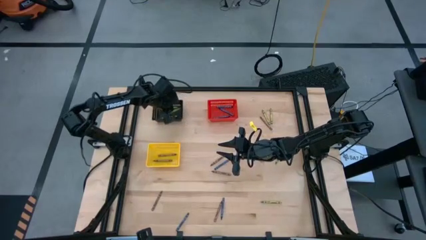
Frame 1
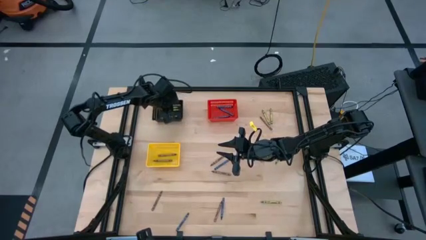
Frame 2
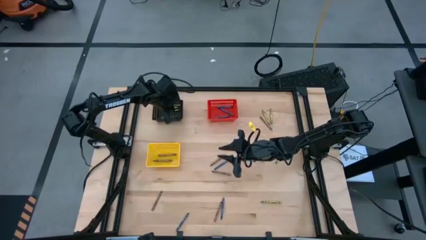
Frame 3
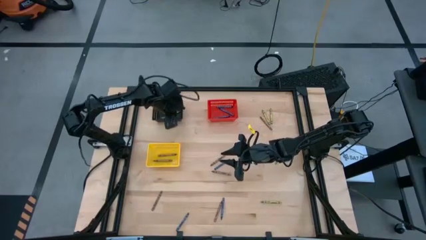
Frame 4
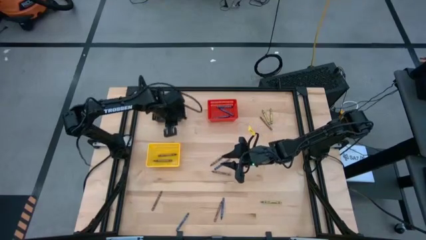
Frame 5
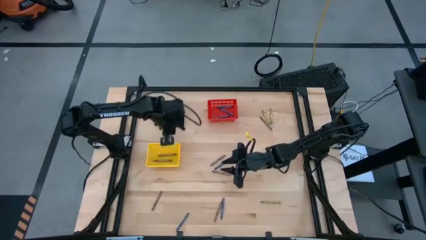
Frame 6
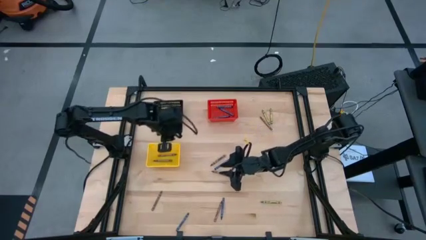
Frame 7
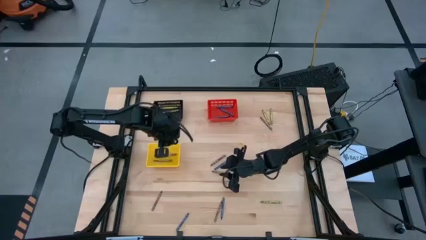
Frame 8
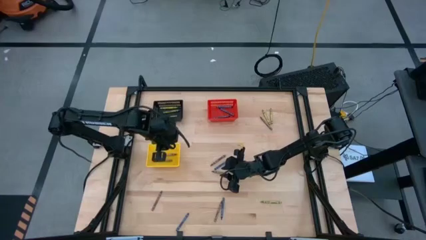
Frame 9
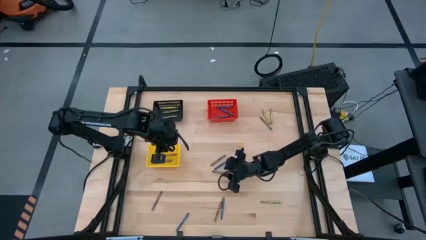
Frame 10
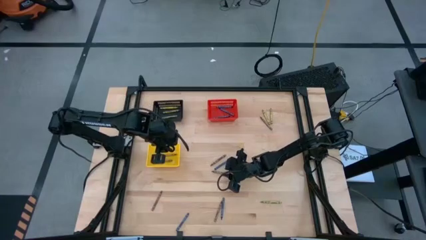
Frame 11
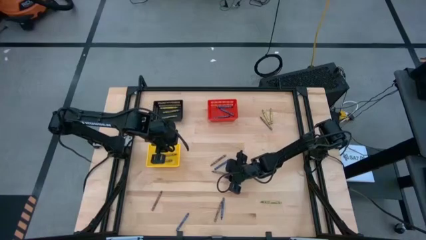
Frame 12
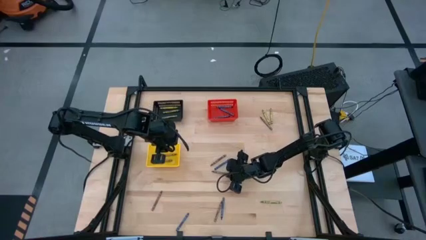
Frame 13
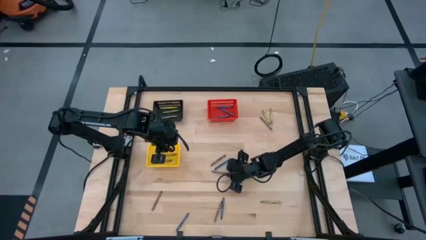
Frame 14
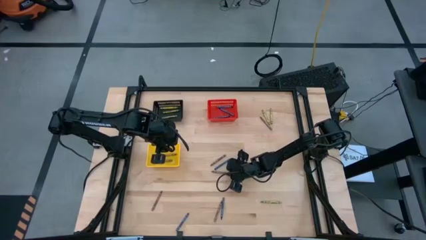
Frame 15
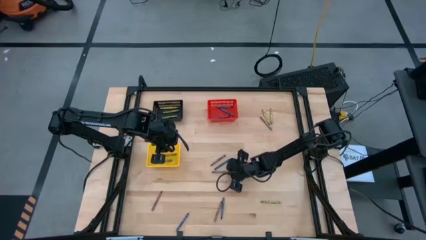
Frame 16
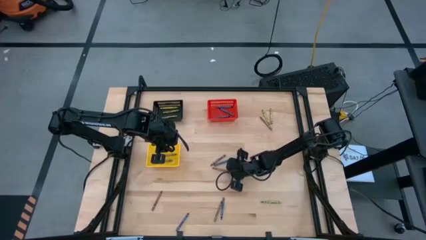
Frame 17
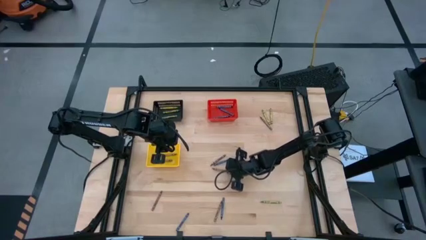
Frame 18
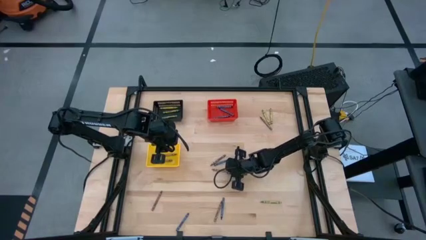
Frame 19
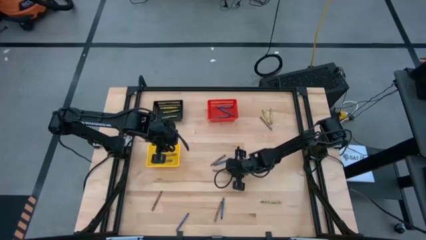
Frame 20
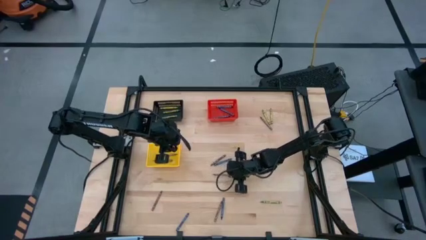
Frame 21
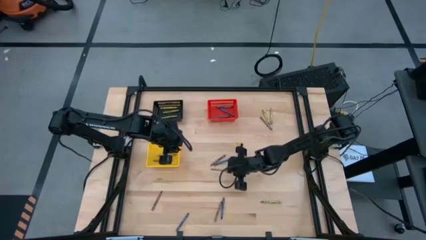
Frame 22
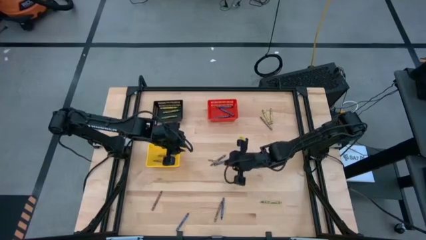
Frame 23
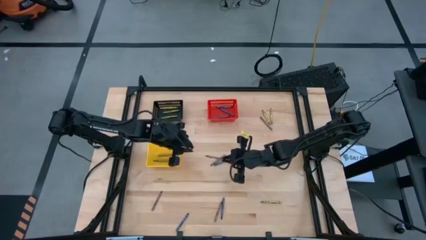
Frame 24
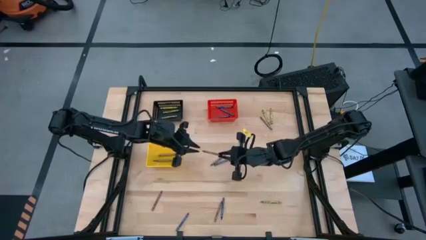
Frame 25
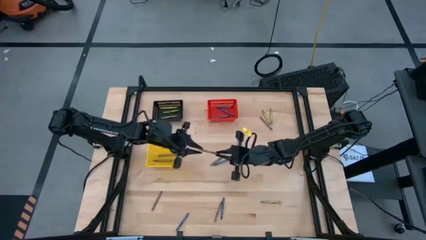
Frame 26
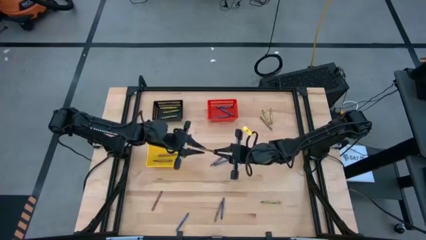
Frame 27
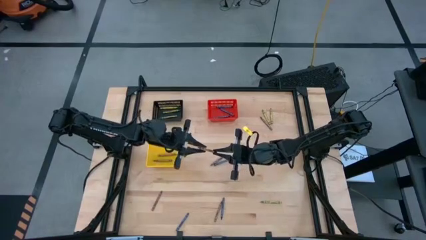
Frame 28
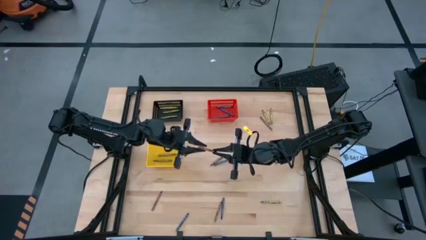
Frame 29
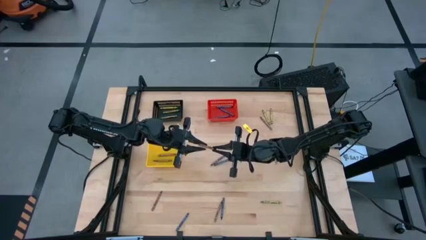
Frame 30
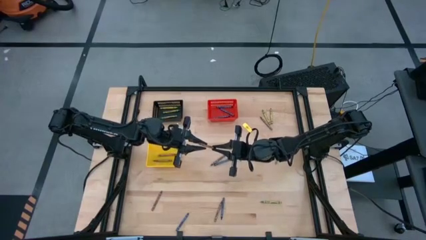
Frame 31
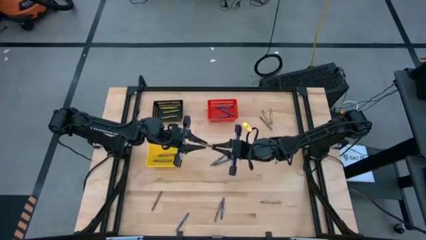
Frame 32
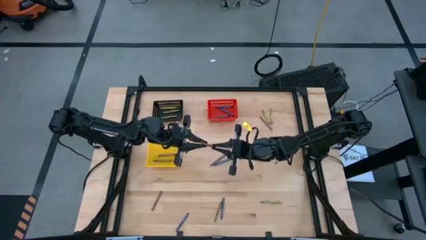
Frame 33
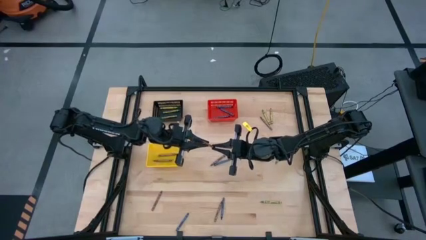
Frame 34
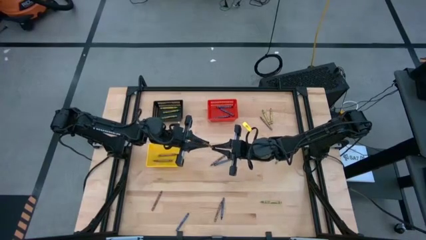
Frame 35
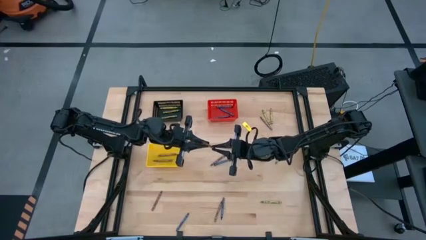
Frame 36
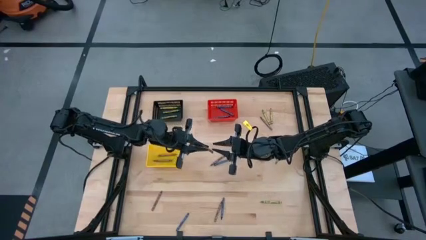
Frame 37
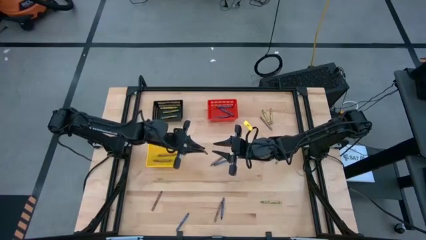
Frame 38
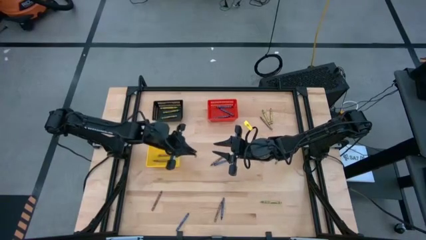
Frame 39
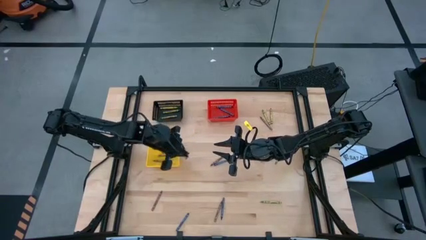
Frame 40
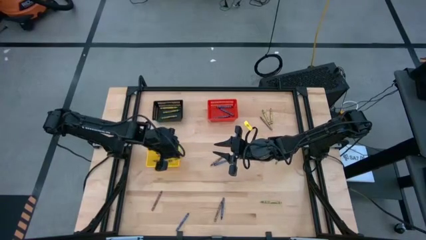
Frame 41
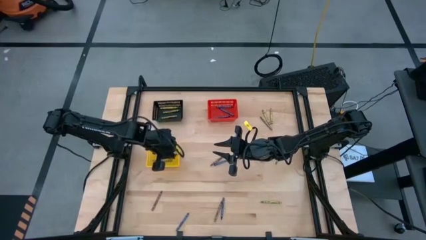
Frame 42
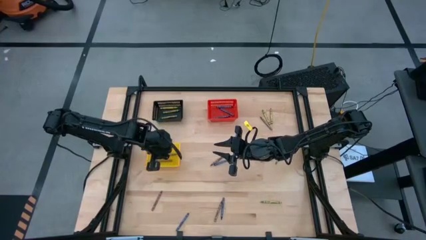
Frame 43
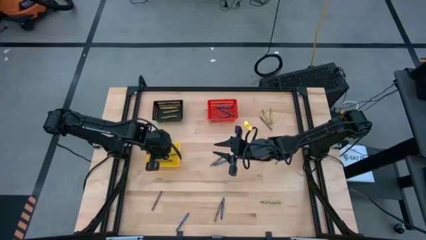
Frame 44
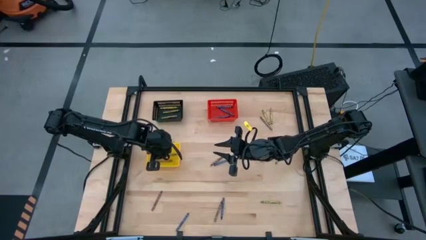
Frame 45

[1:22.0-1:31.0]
Task: Sort crayons
Put the brown crayon into the yellow basket

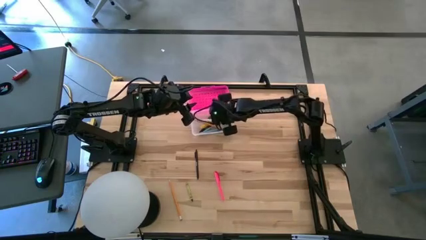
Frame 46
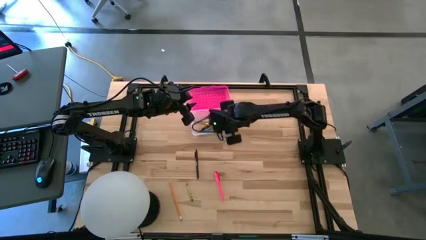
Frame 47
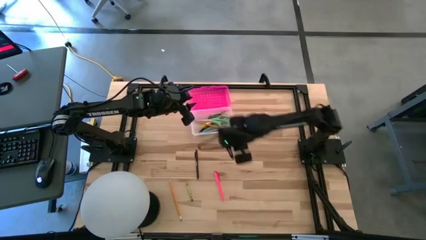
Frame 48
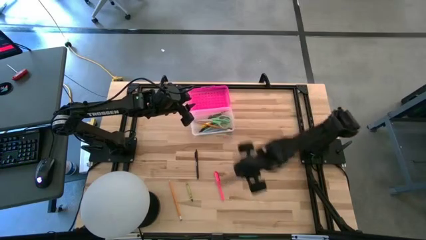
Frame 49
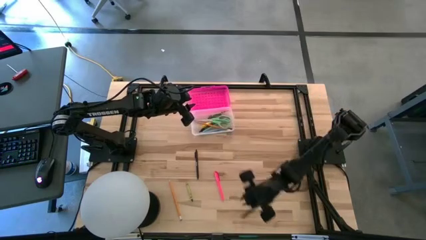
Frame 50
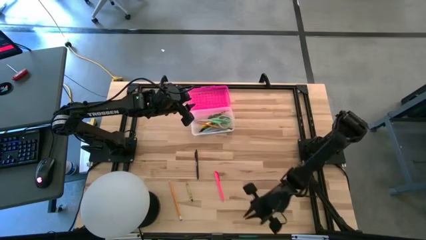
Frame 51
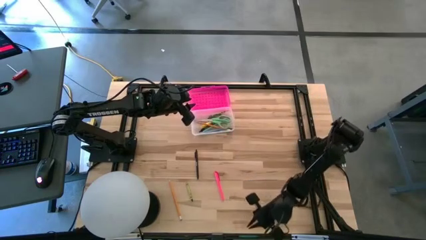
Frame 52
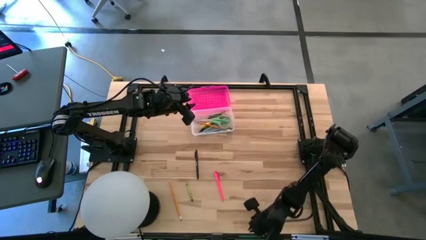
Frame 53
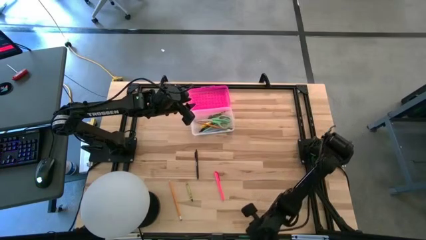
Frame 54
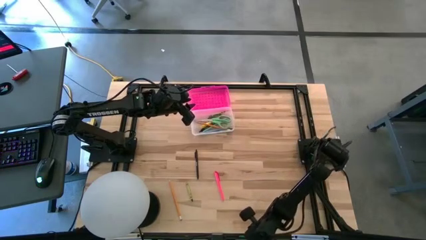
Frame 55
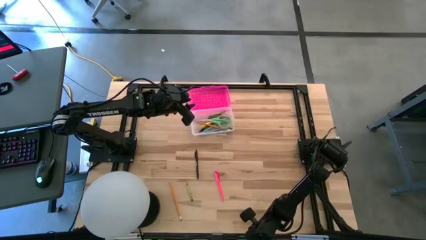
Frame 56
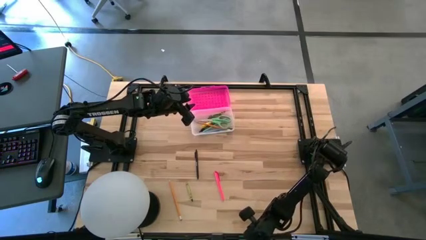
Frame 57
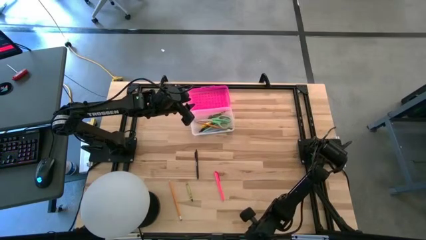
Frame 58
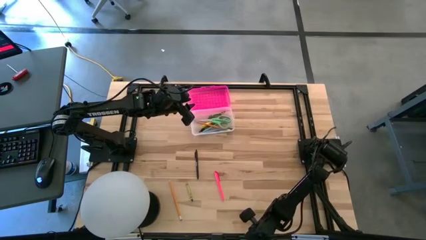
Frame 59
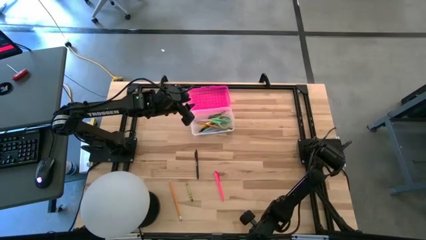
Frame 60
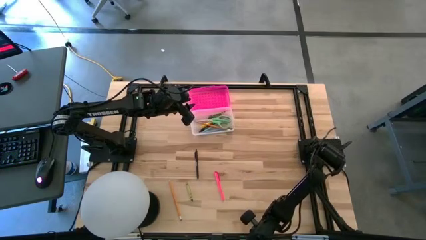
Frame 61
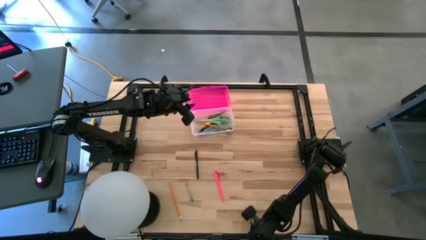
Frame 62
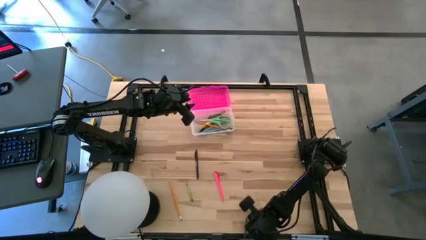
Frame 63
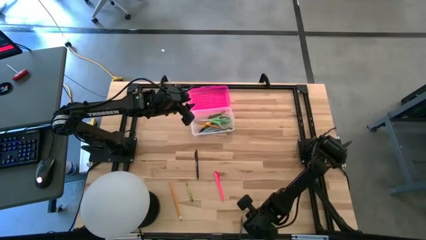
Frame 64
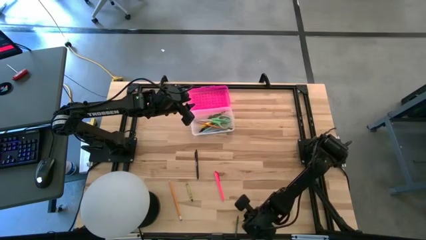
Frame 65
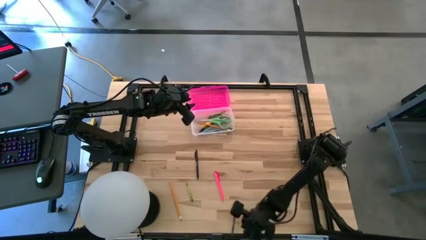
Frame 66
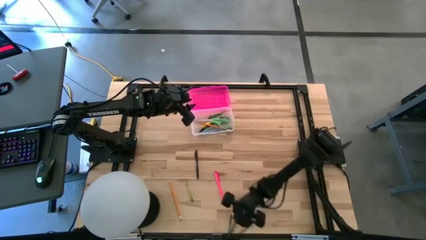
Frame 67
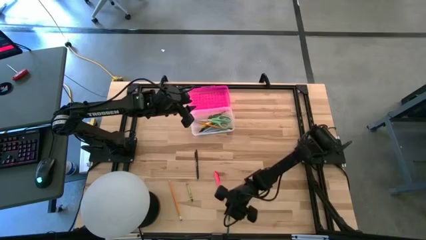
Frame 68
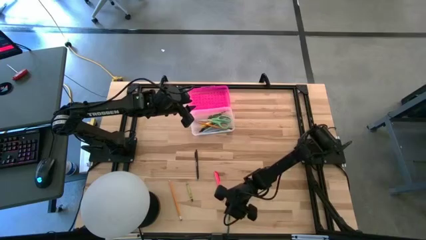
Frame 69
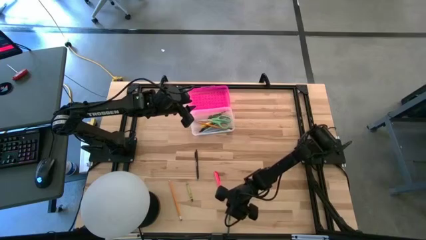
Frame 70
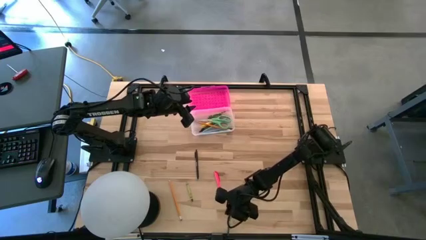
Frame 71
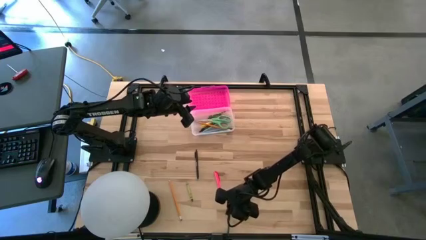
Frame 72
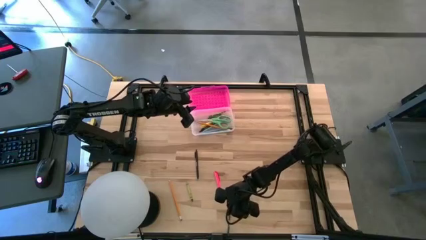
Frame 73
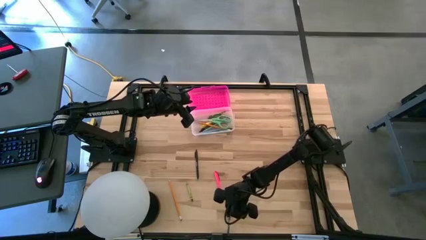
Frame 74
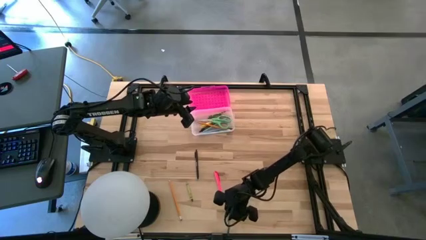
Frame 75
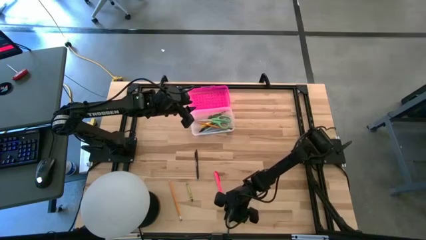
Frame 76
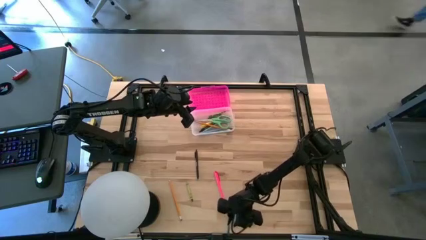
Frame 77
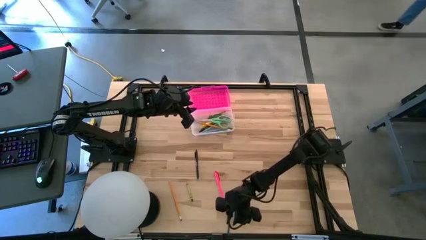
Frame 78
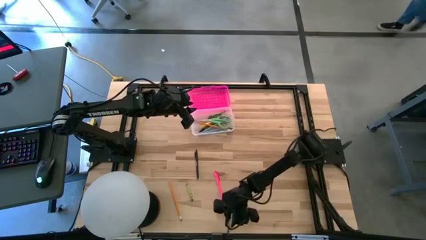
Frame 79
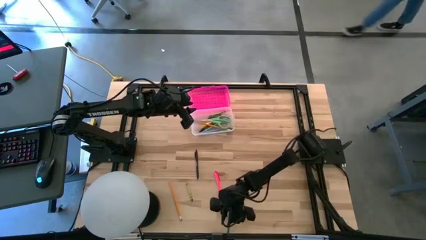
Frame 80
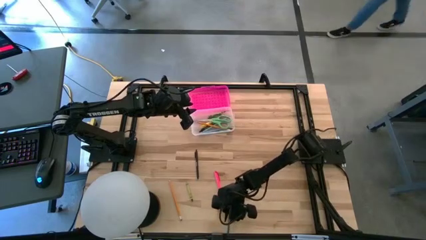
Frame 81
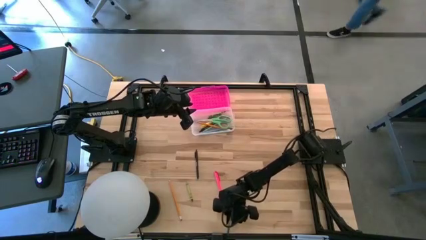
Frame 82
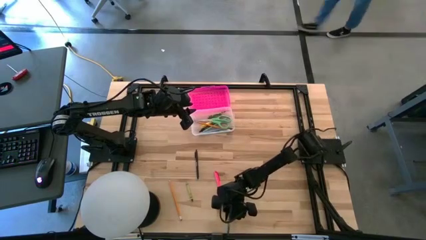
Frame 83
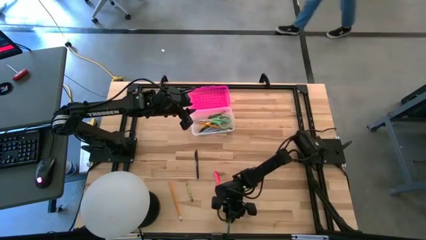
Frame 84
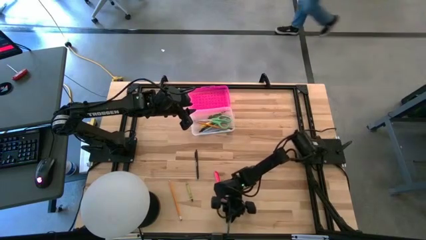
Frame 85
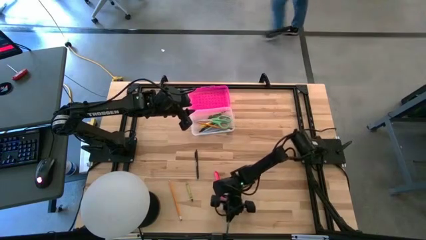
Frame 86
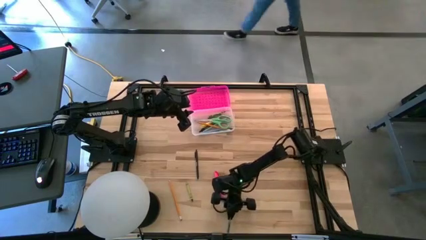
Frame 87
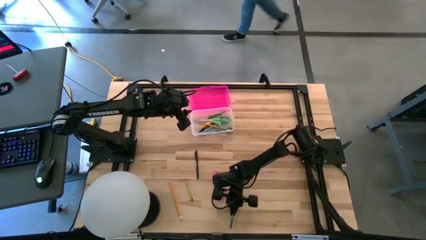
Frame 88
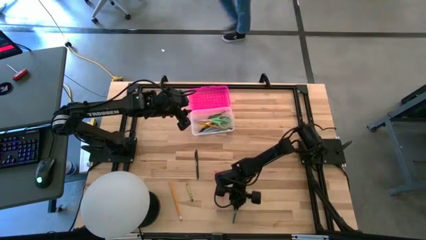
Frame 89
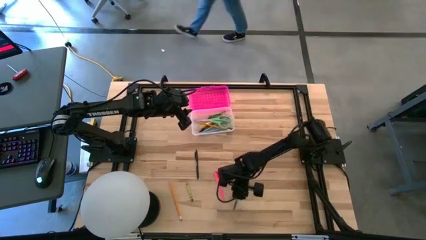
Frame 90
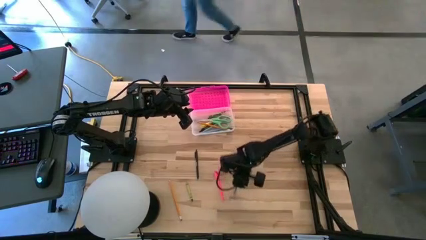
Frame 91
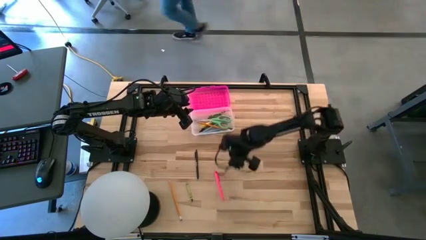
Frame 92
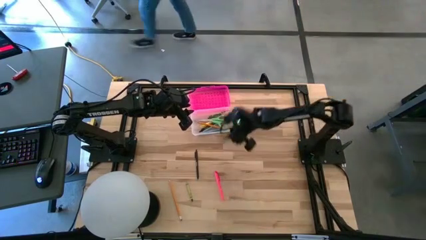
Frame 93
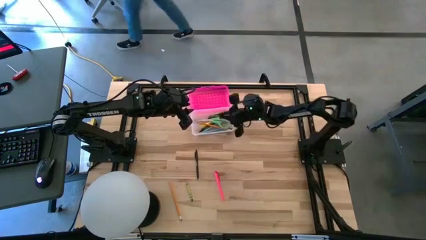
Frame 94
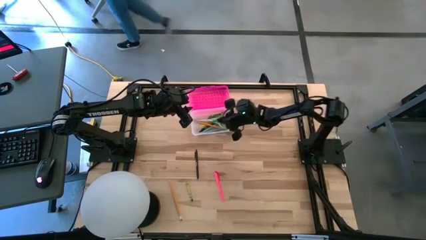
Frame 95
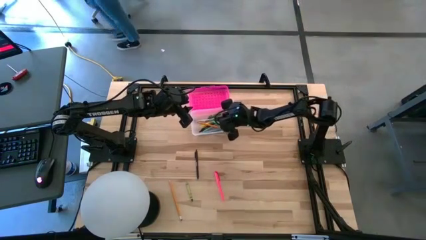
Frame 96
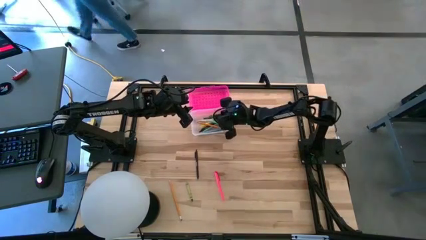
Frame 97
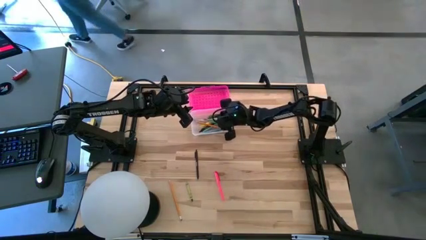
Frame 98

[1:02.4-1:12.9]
Task: Pick & place school supplies into a supply box
Put the dark green crayon into the pink supply box
